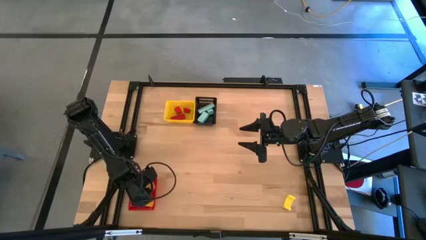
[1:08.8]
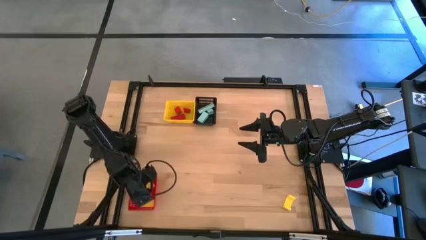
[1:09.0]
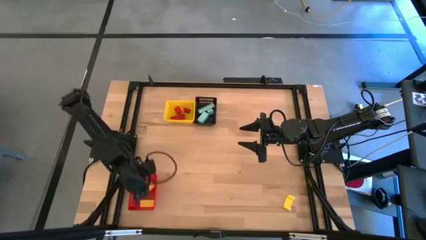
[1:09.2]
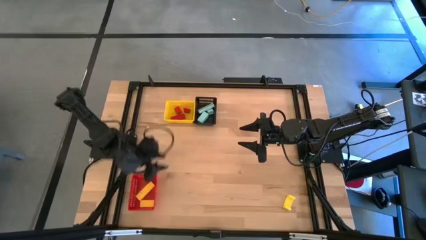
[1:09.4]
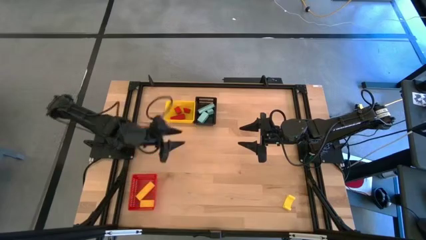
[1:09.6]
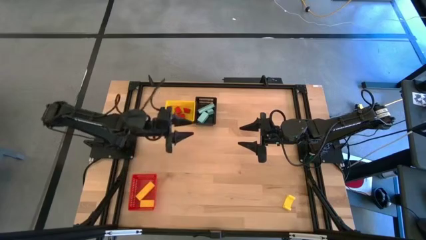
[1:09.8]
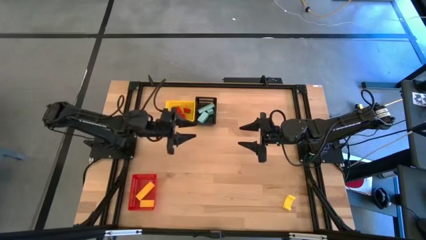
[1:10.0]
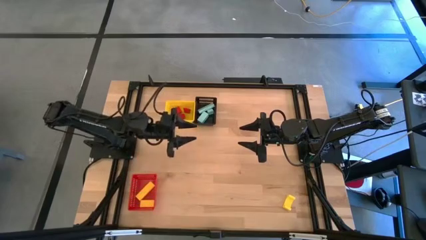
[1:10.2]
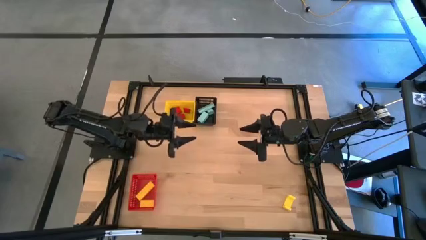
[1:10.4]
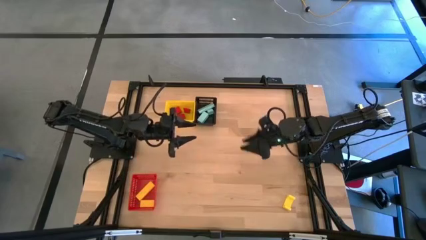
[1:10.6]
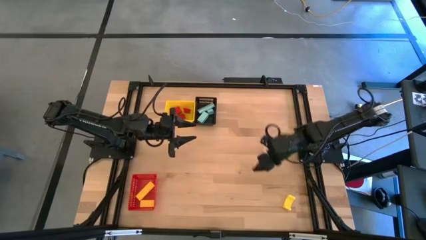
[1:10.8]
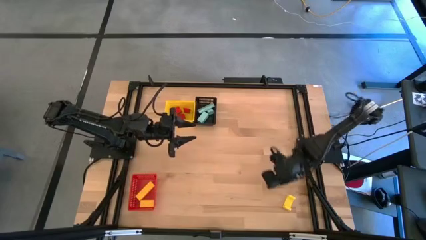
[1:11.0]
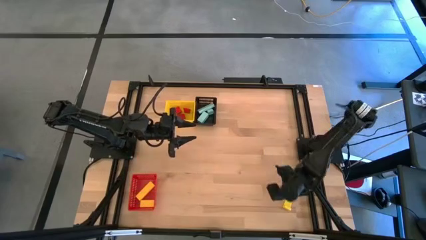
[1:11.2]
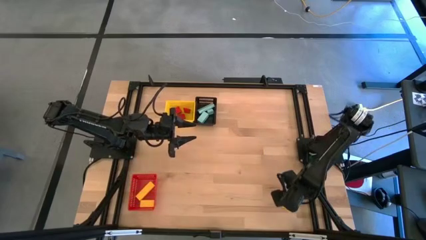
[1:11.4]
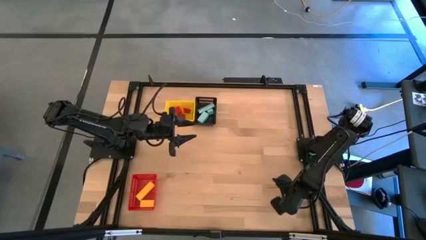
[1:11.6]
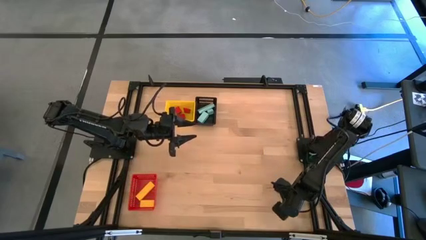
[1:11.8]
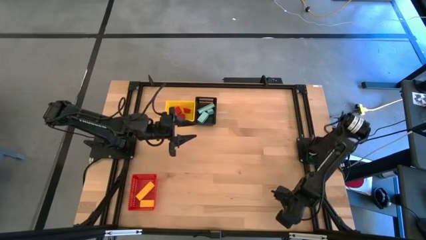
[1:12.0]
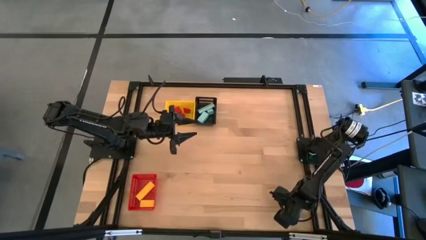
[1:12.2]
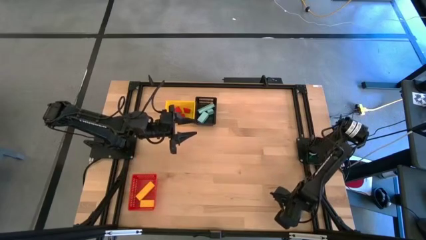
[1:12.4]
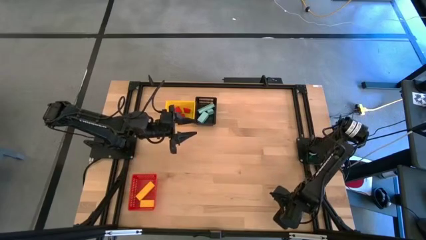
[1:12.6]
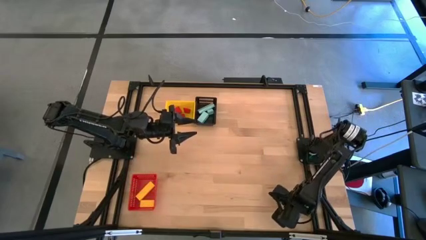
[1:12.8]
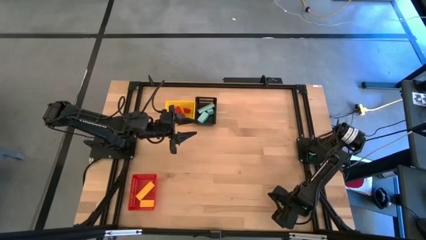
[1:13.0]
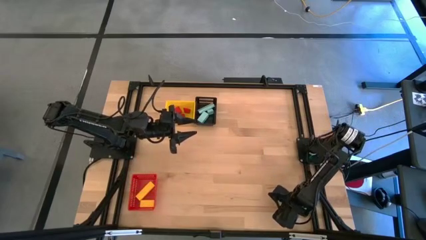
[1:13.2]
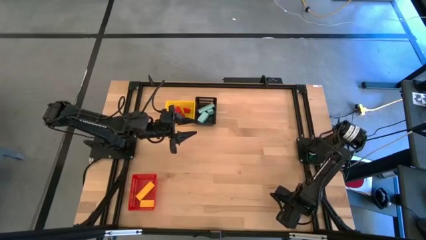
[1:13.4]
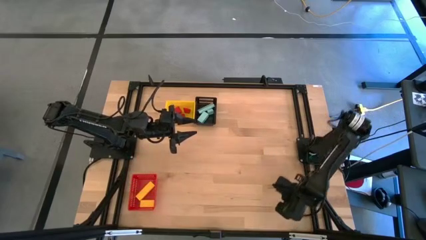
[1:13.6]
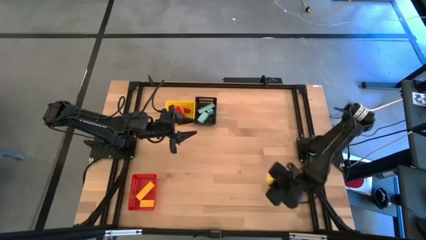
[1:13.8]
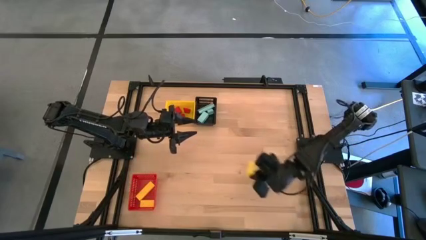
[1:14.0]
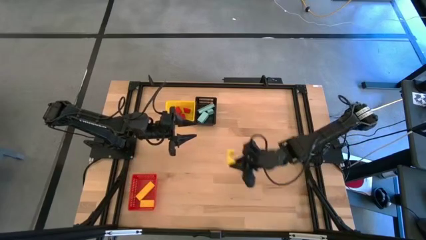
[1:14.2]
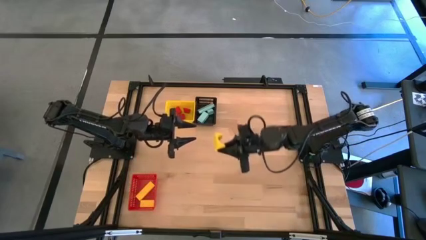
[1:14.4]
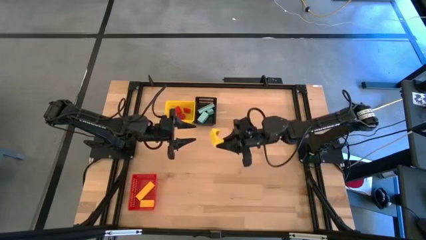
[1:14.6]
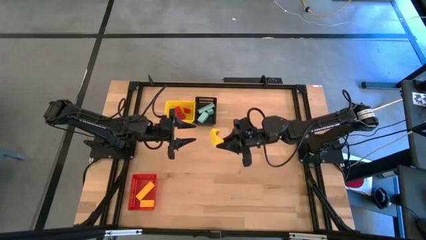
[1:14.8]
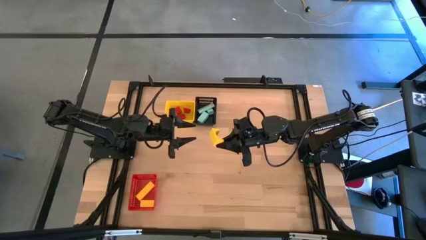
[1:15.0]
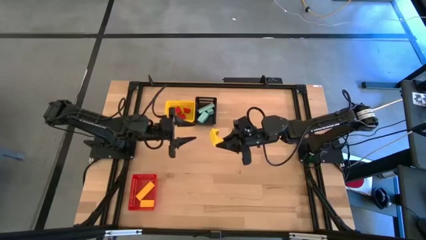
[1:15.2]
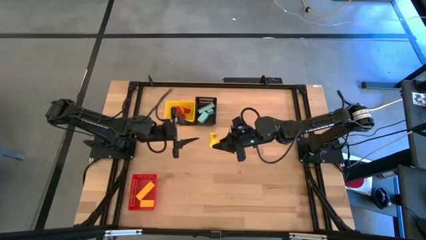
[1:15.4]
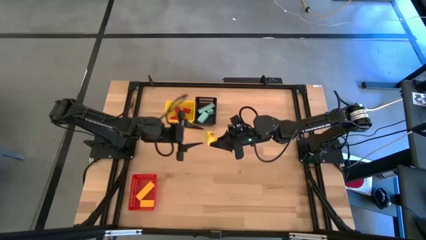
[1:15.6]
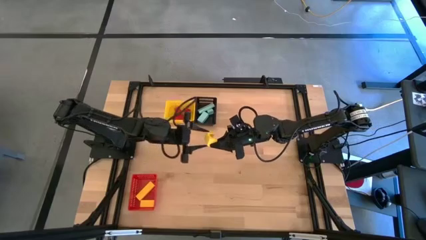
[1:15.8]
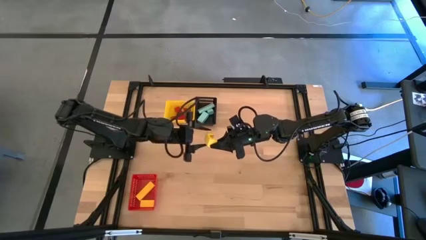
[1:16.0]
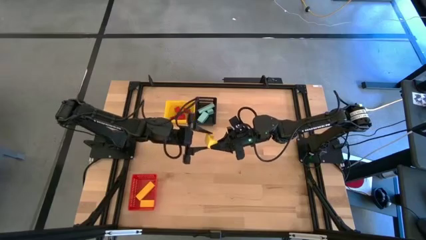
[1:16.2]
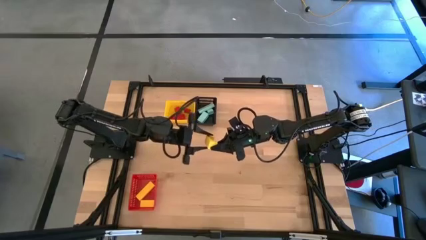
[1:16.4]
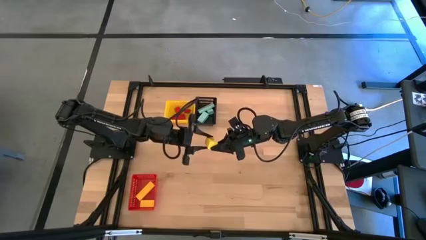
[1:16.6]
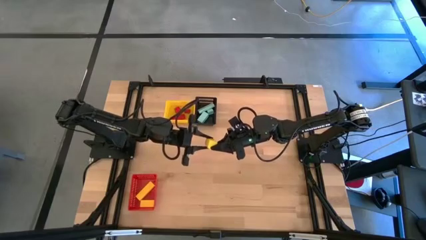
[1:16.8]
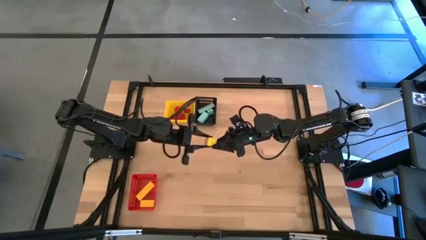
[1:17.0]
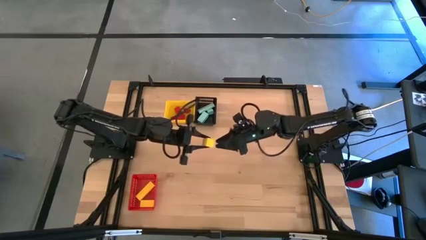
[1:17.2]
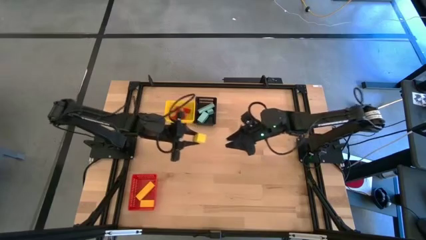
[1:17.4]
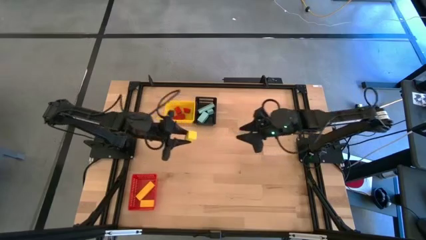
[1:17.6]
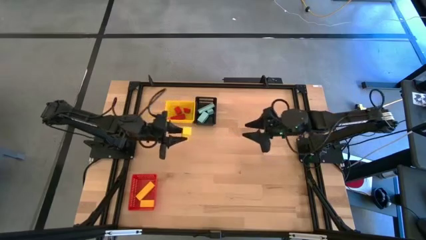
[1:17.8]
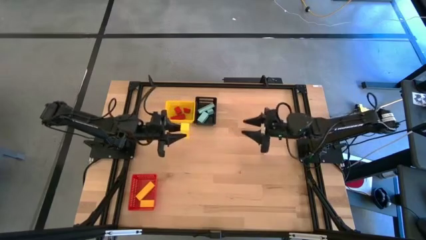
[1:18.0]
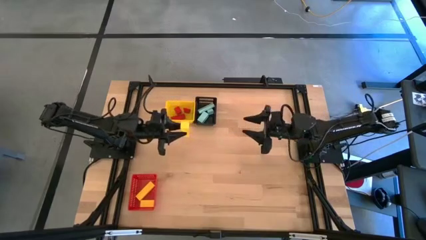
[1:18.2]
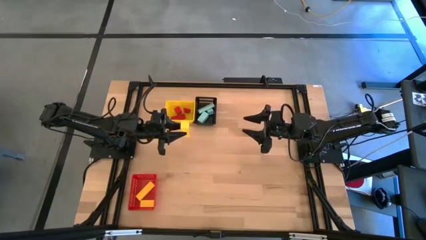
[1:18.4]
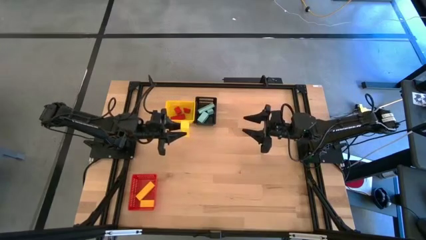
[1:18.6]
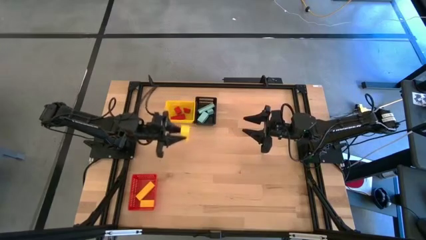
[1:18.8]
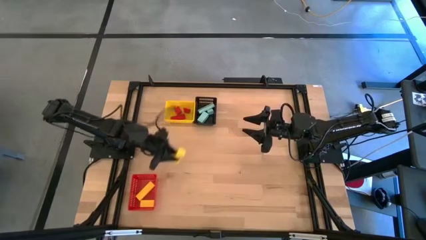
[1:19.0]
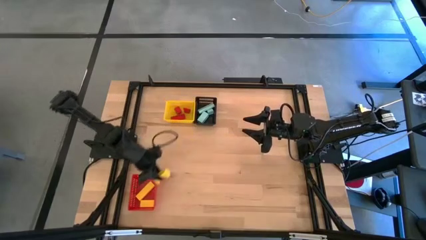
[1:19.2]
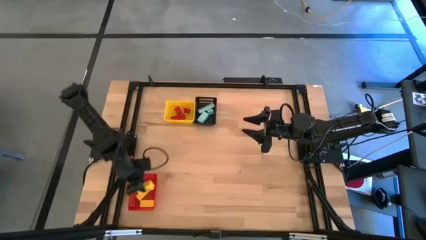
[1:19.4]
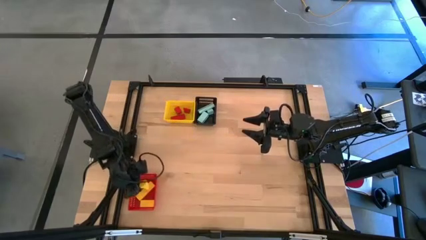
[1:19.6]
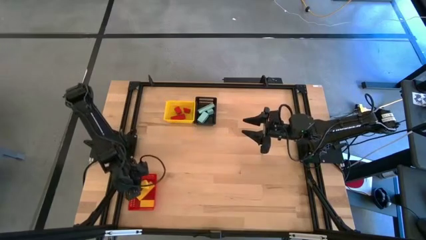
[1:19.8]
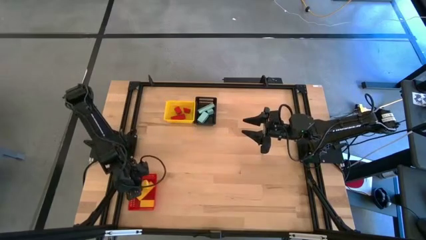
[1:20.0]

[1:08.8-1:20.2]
Task: Sort & place blocks by color
Put the yellow block into the red basket

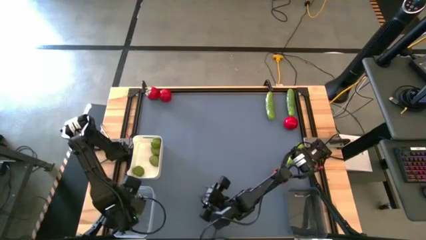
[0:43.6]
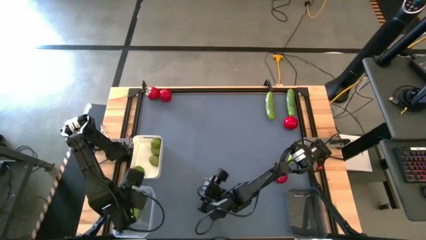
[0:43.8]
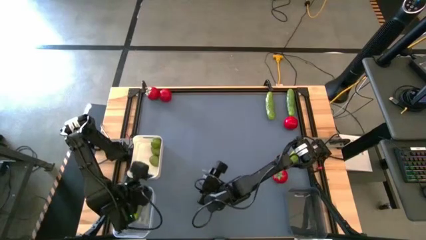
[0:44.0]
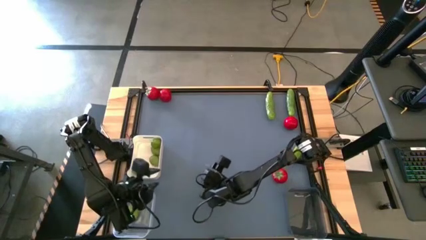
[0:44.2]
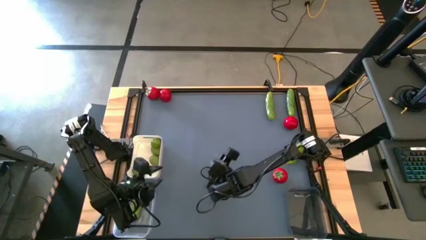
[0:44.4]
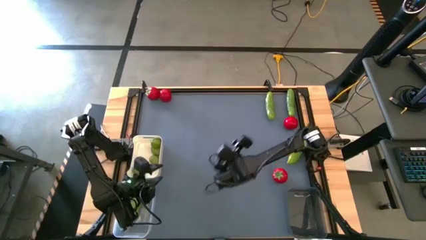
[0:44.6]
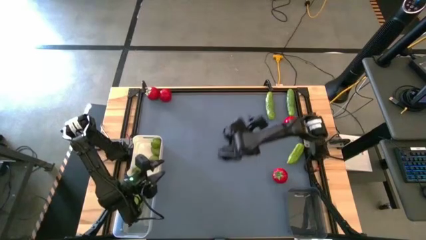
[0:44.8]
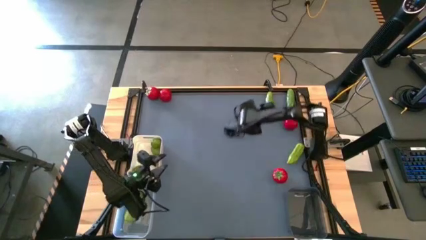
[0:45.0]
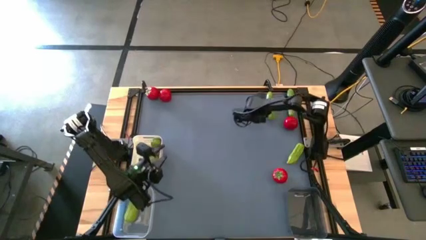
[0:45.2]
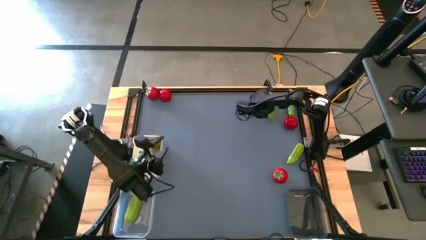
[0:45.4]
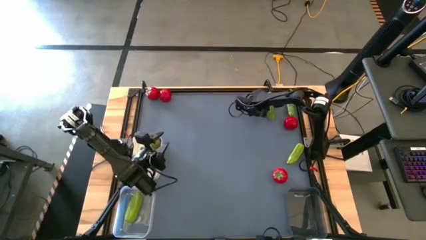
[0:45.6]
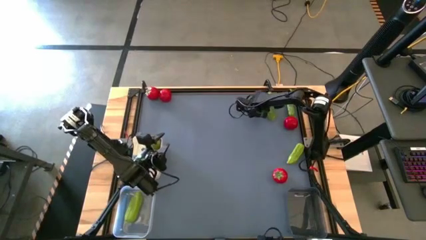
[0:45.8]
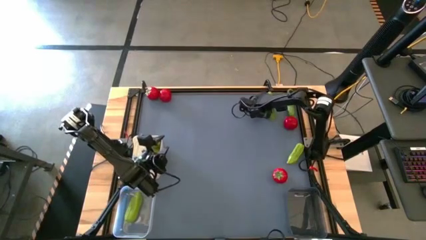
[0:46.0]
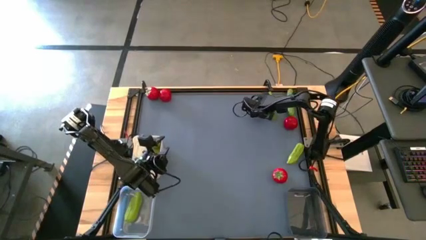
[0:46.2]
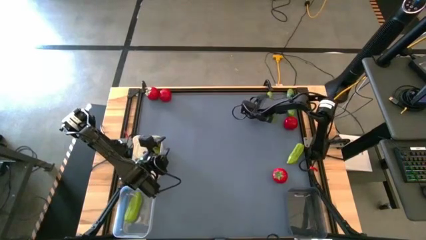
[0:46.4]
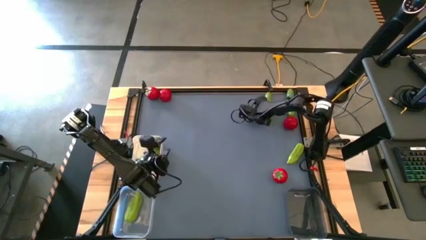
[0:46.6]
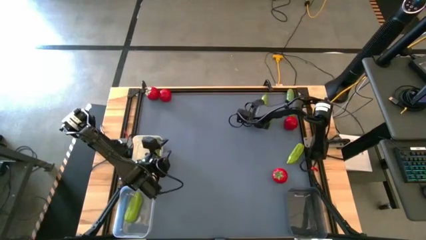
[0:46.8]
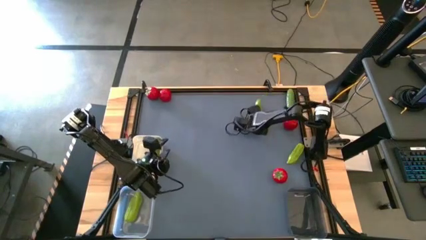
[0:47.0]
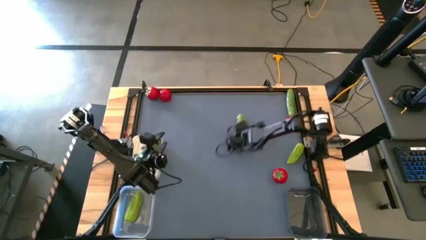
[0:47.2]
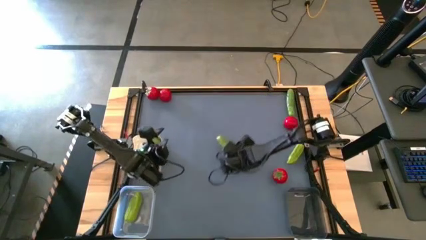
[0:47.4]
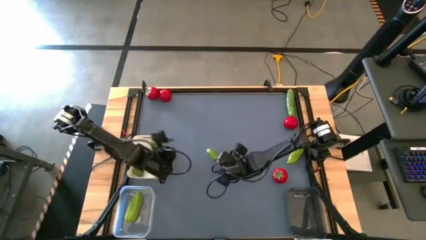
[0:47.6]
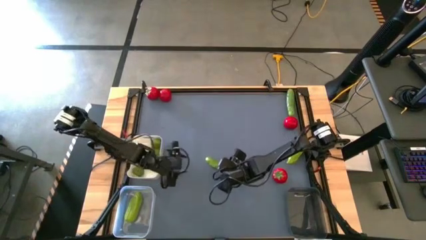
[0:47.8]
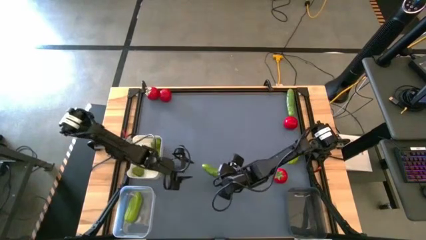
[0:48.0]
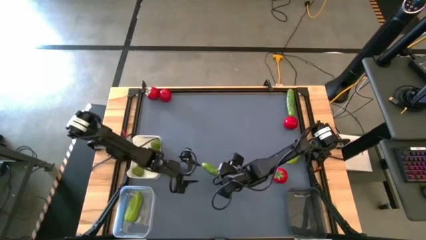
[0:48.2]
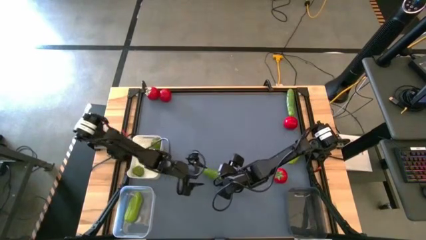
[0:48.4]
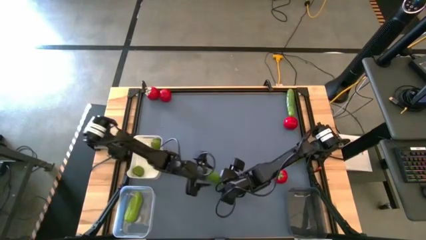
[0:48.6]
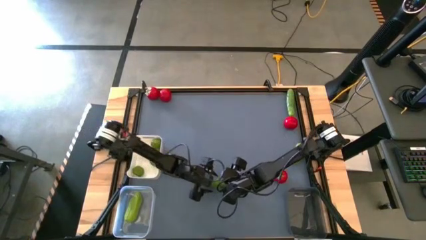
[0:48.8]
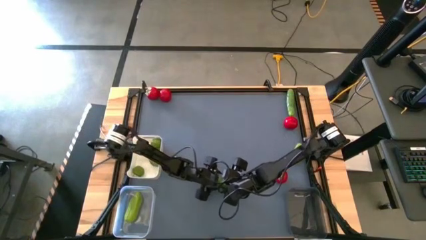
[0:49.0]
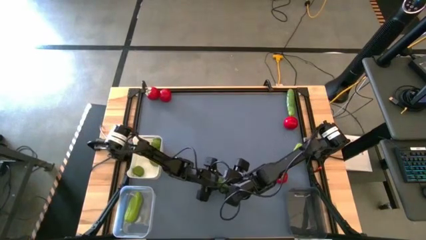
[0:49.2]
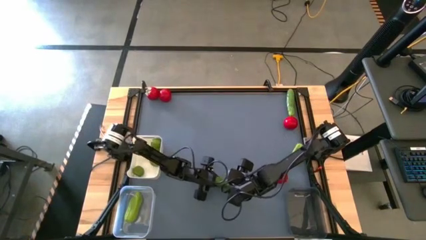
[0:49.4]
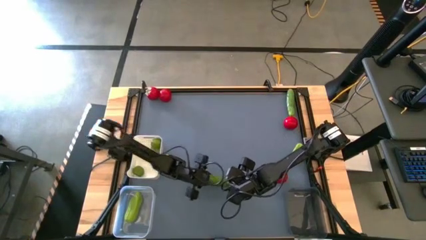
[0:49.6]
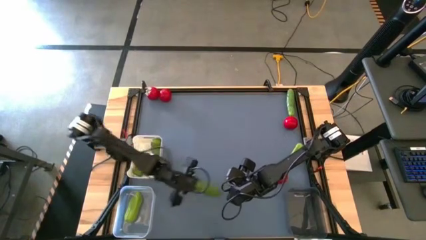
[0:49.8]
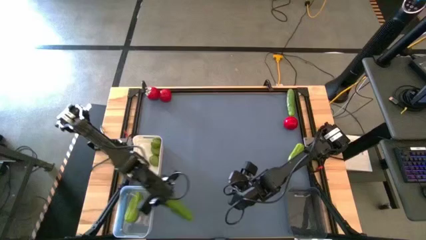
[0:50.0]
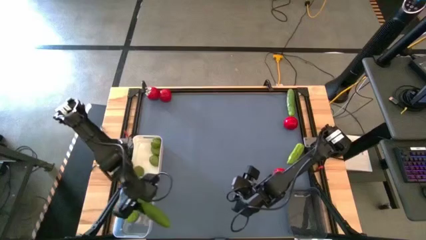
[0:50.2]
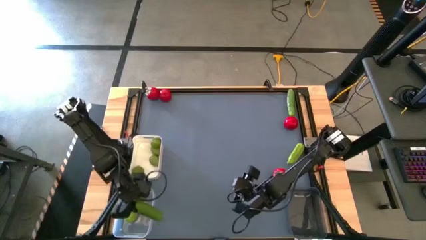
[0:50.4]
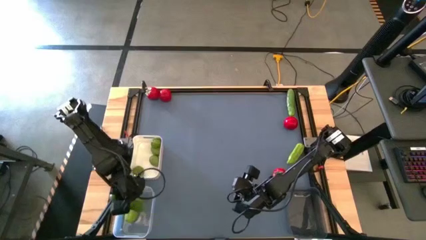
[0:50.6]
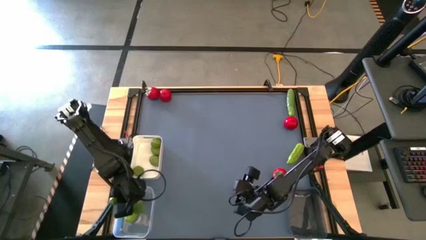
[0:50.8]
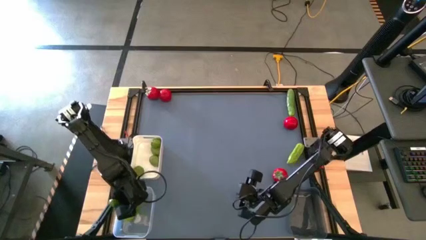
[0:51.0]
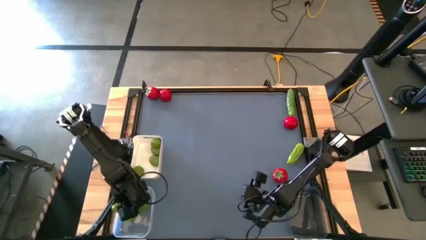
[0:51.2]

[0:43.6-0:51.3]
Task: Sort produce into baskets
Put the green cucumber into the transparent bin
